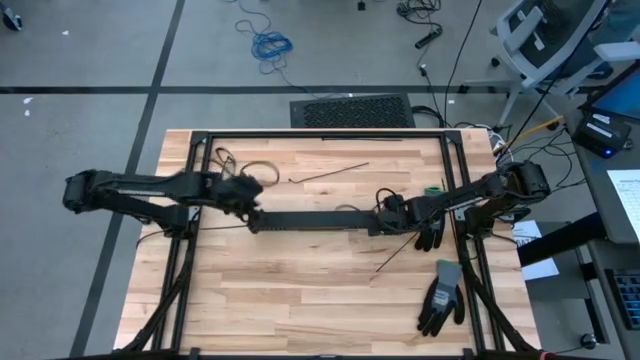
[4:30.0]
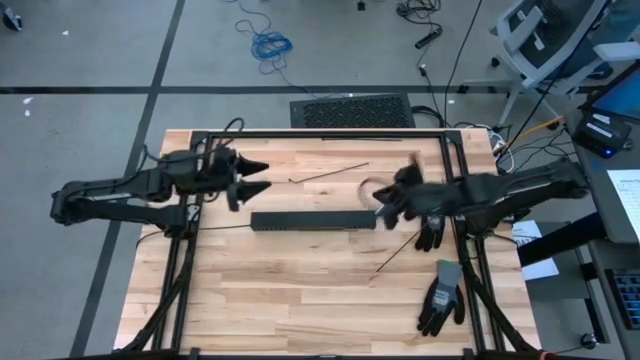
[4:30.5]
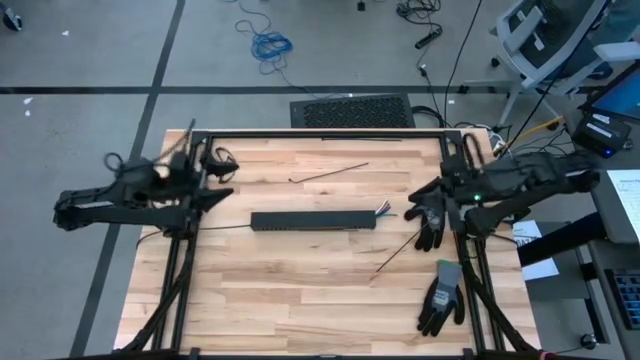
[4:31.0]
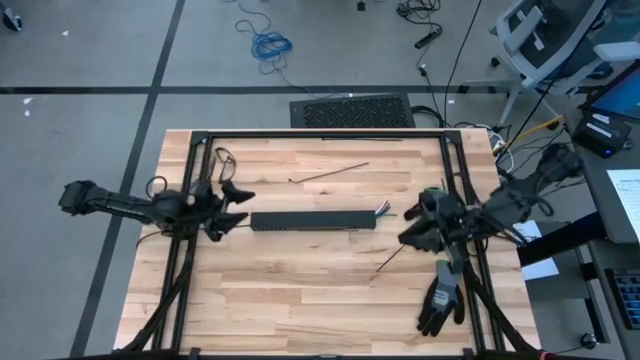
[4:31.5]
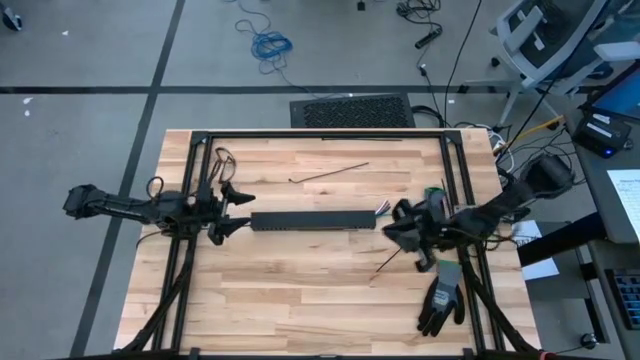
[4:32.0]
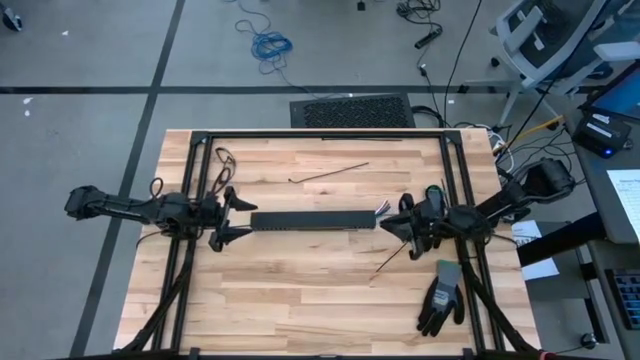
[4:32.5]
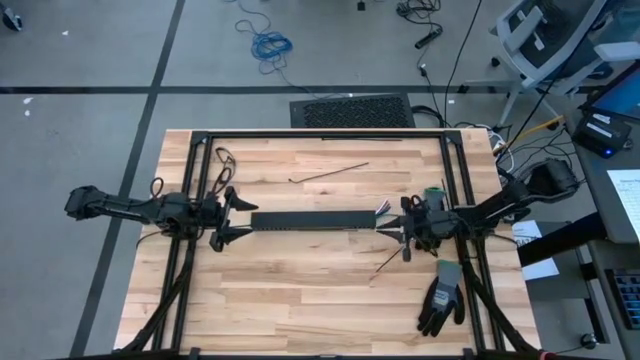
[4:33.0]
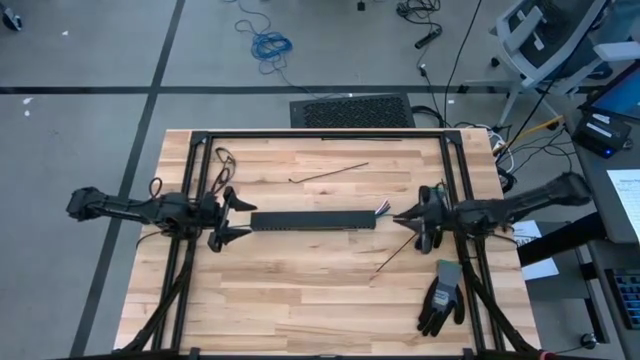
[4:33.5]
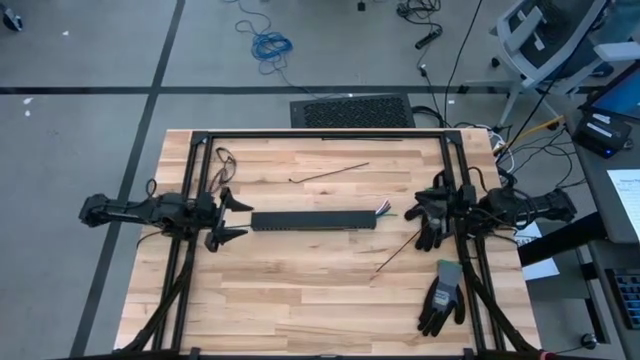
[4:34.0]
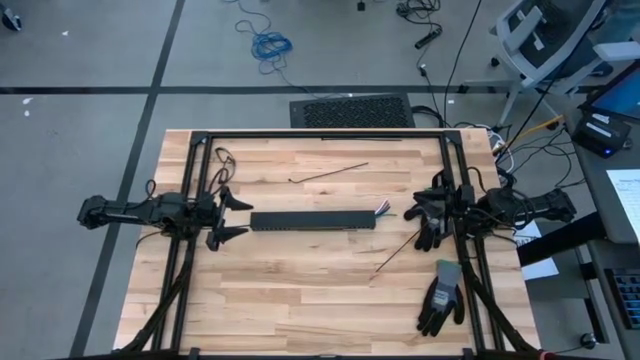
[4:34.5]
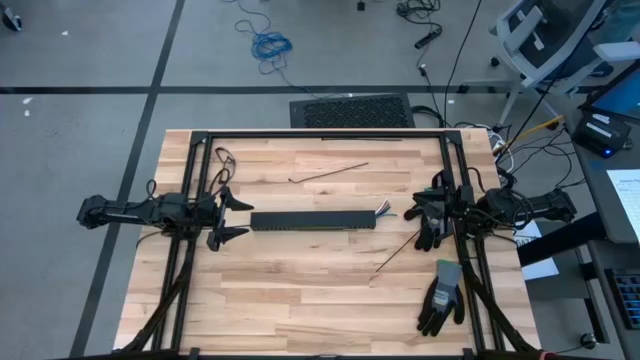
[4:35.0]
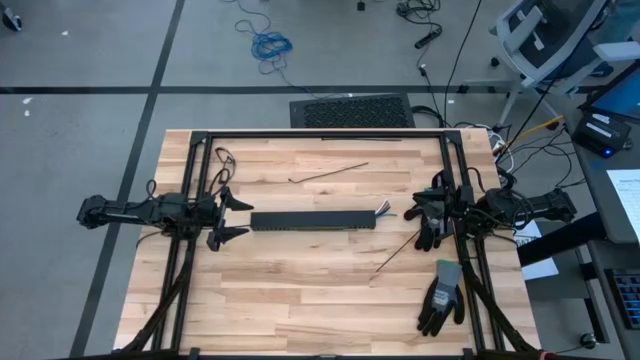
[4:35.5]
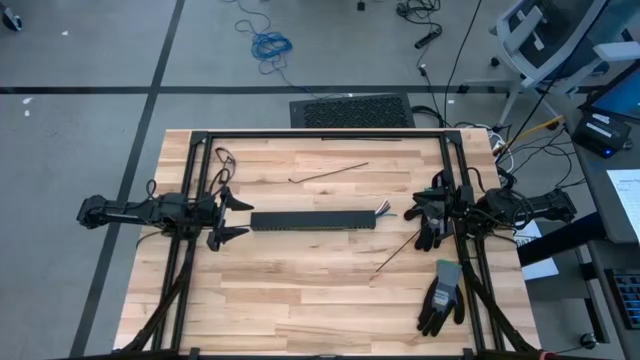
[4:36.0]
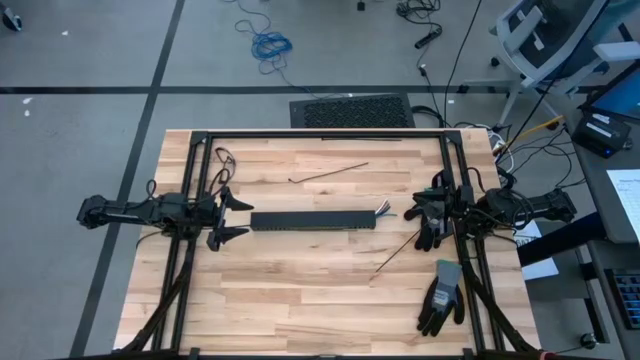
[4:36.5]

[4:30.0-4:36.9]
Task: Ziptie cables
Return to Home Position

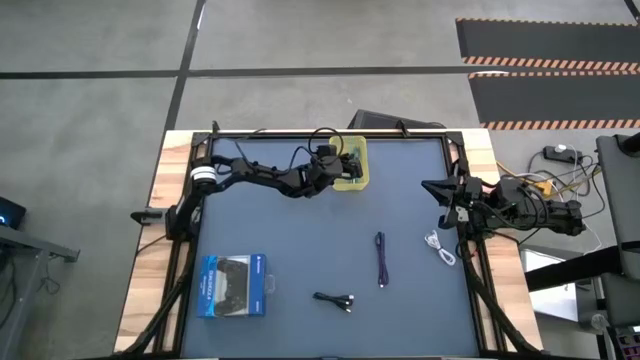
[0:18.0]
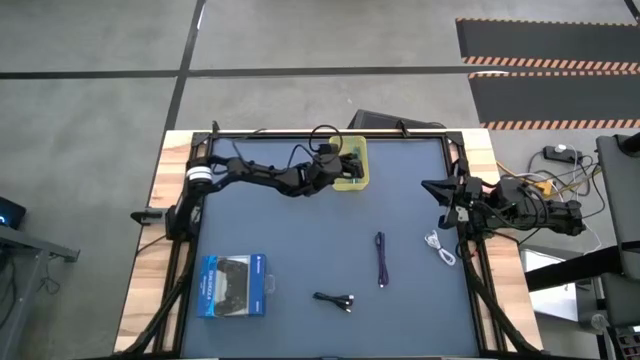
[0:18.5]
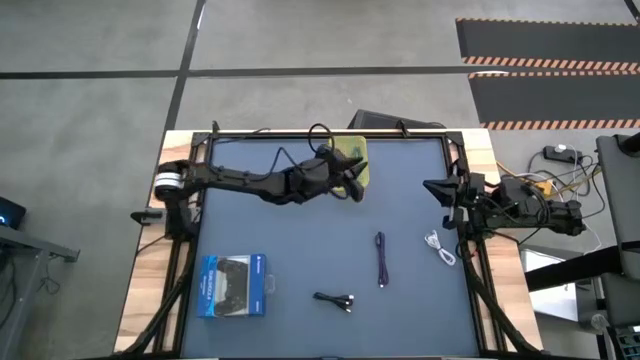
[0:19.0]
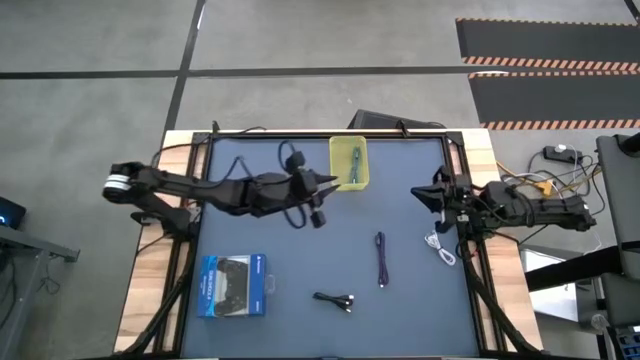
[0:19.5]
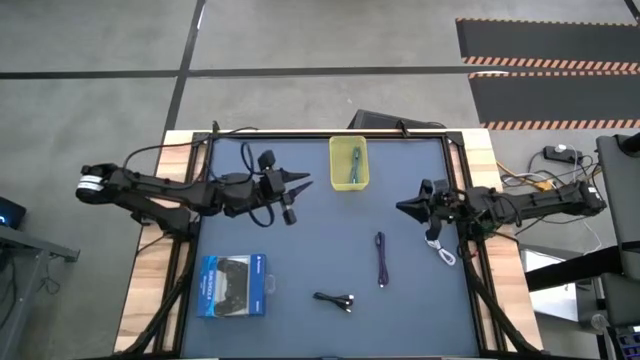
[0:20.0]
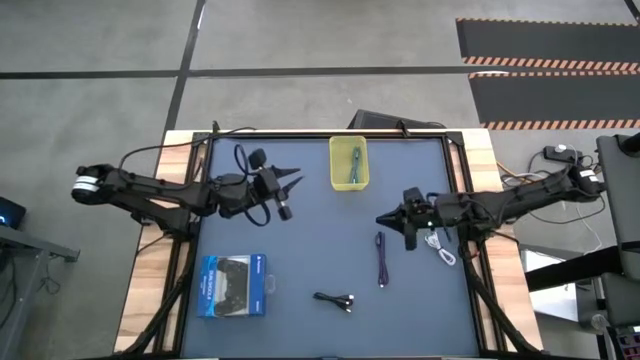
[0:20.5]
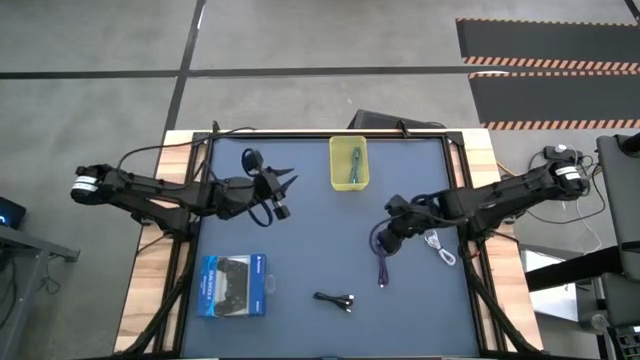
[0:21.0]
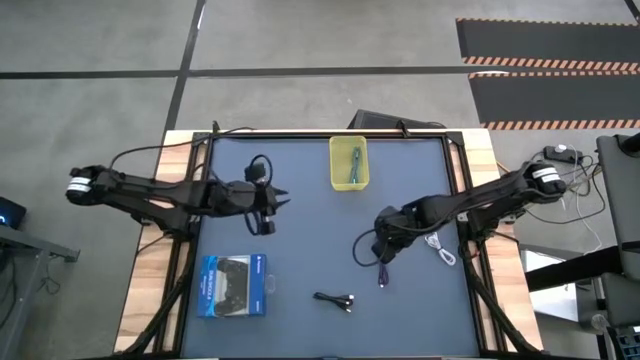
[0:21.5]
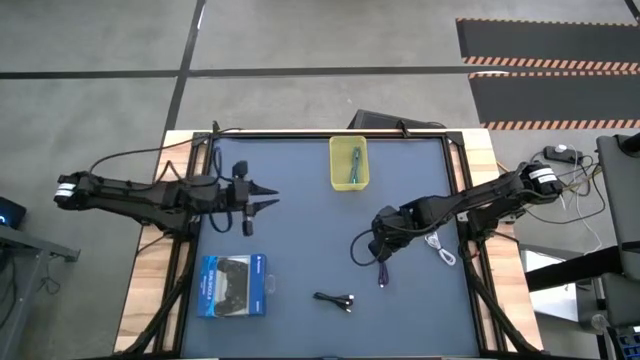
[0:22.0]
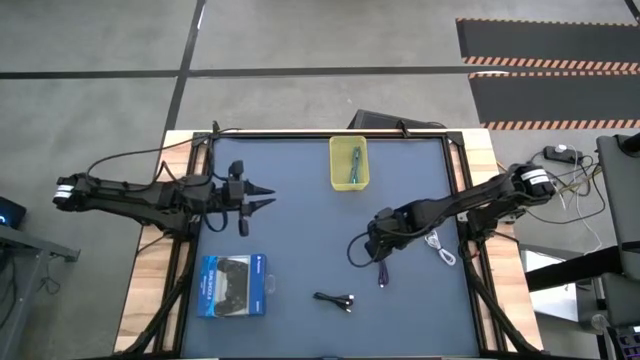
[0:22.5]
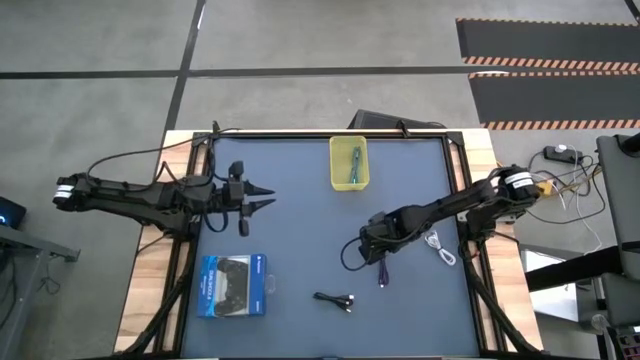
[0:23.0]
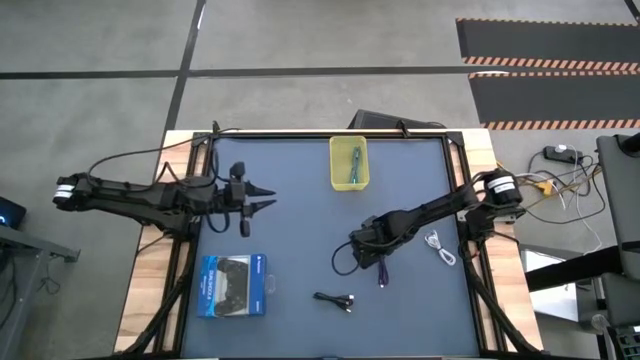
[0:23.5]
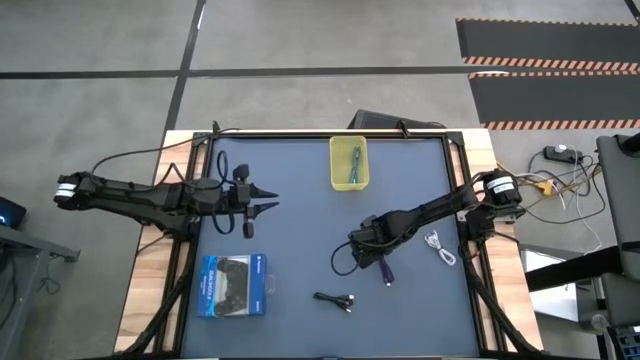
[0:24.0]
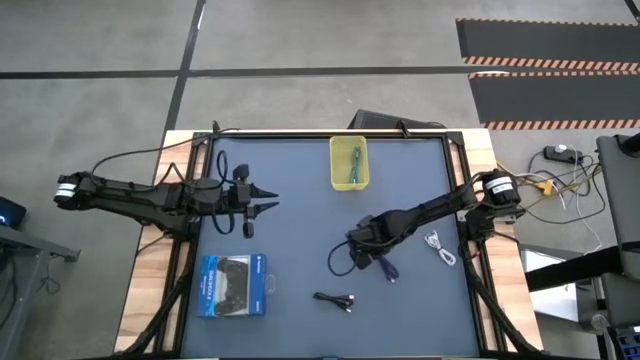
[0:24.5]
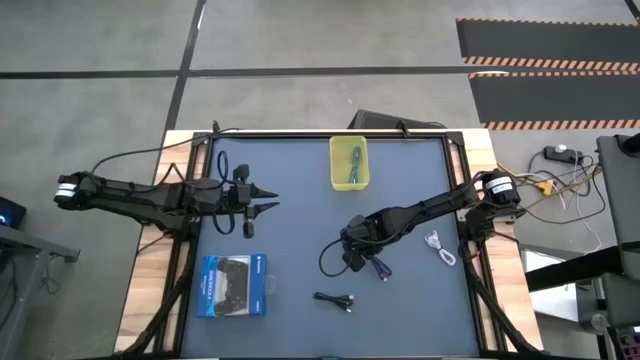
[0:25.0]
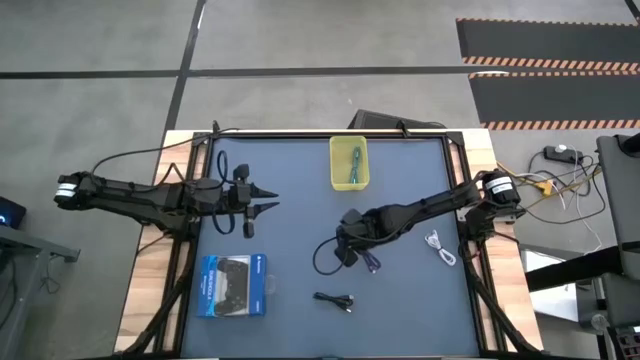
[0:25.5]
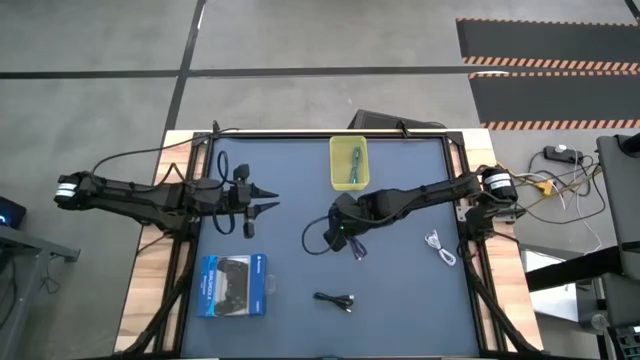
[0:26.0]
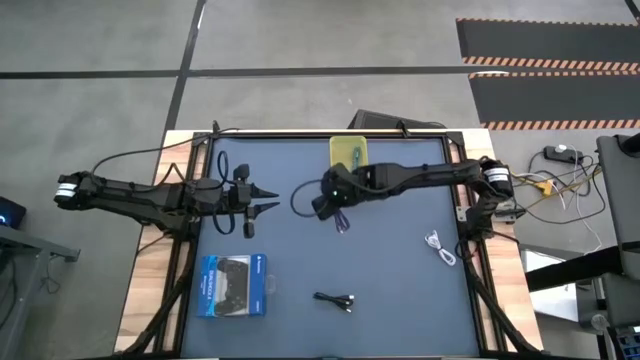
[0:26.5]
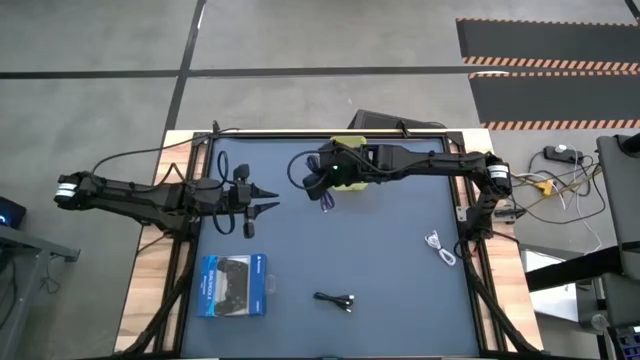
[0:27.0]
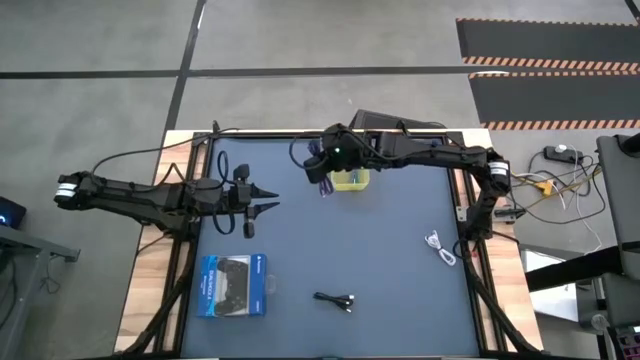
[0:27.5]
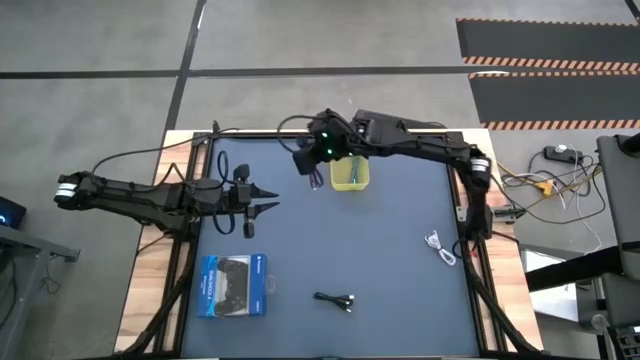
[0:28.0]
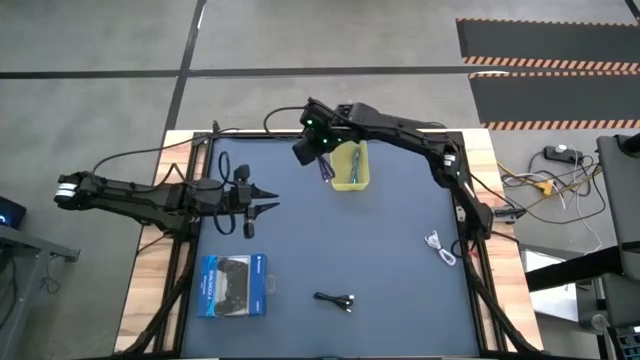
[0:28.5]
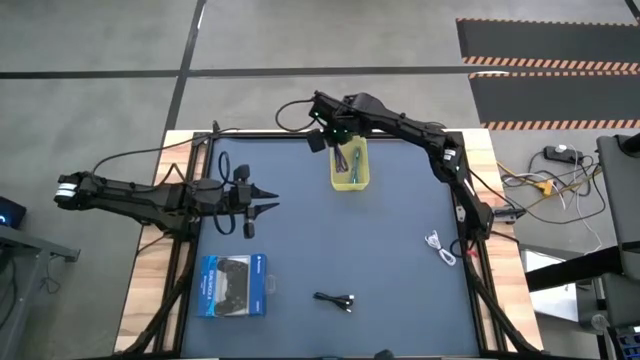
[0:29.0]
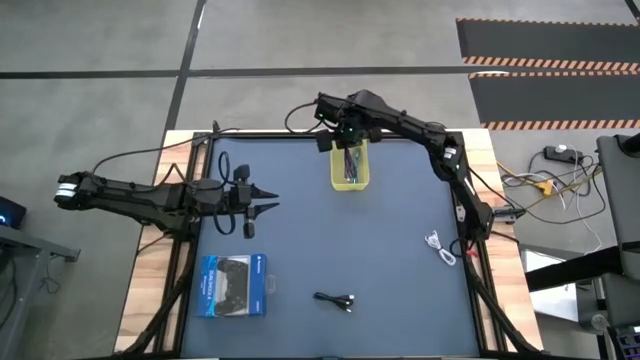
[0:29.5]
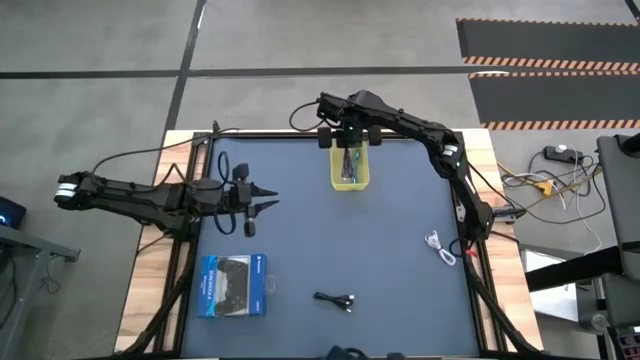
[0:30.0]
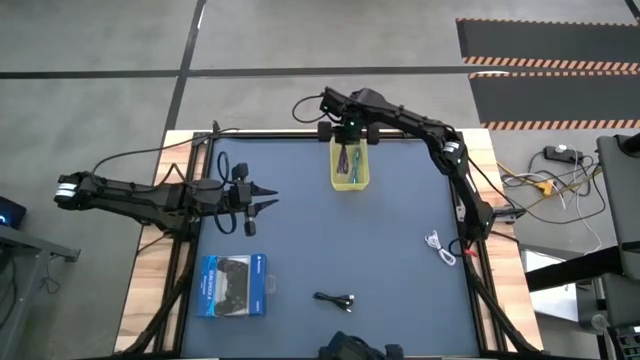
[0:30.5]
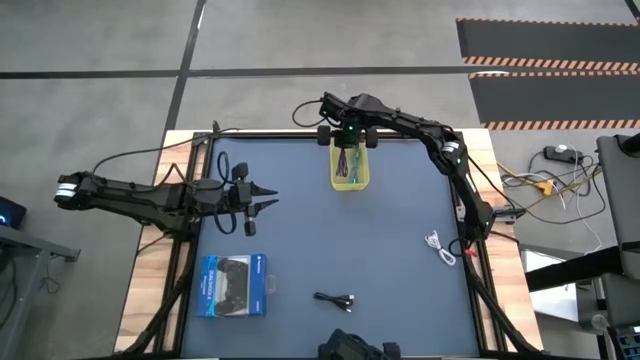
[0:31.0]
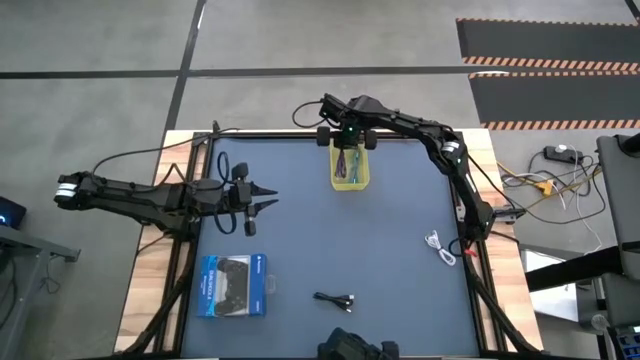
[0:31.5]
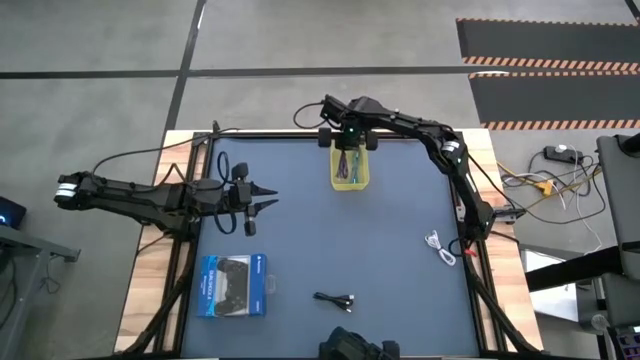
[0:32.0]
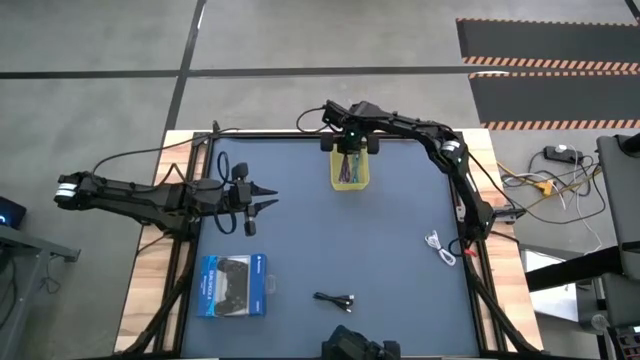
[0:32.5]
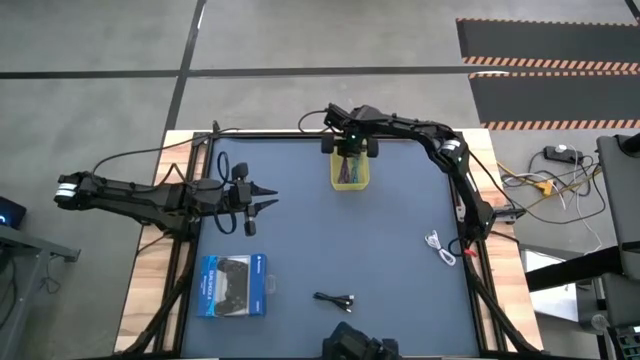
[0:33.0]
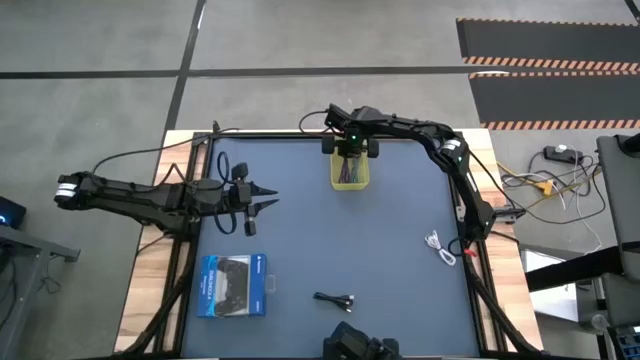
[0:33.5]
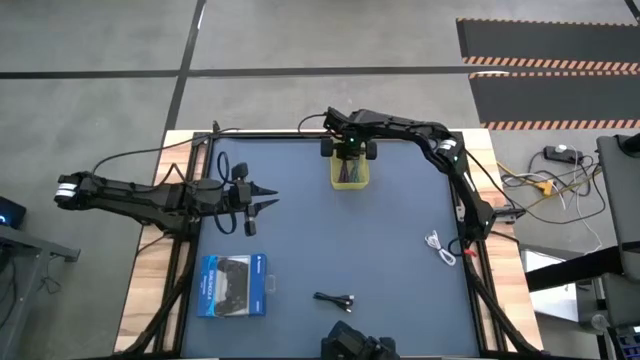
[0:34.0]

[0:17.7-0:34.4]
Task: Pick and place USB-C Cables
Put the purple charger cable into the yellow bin
